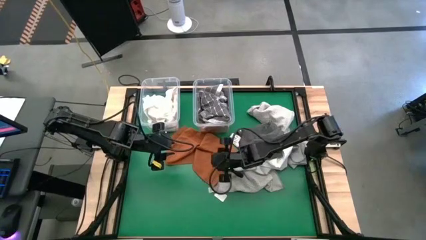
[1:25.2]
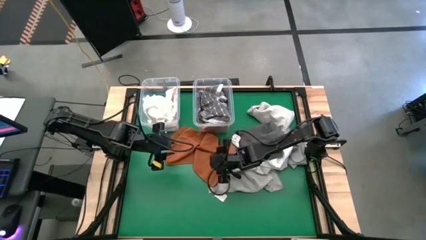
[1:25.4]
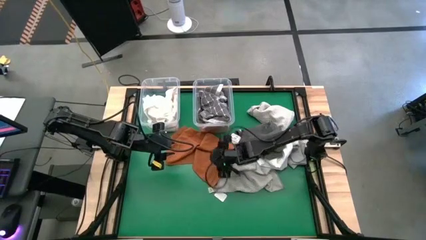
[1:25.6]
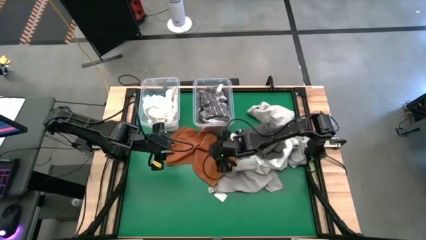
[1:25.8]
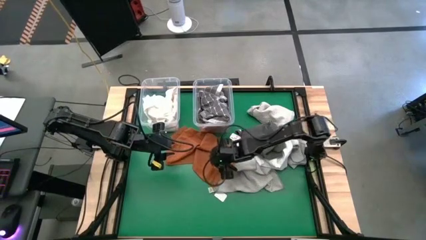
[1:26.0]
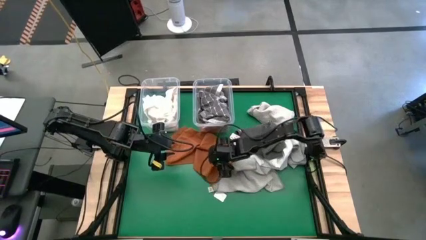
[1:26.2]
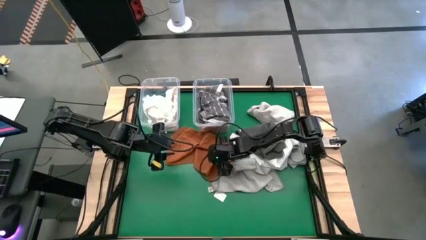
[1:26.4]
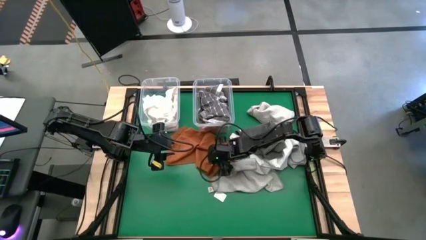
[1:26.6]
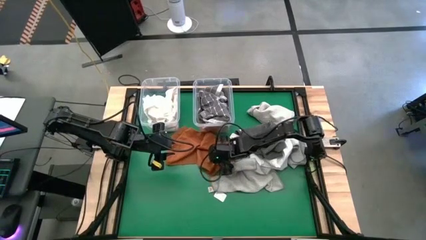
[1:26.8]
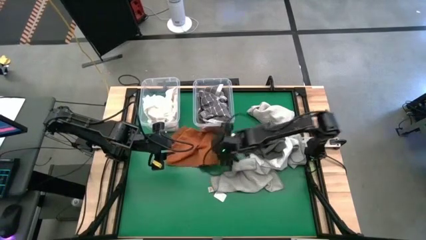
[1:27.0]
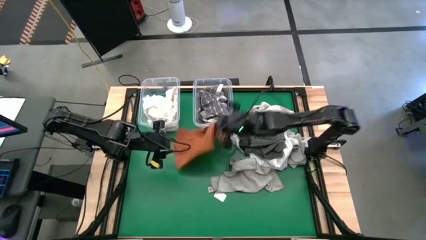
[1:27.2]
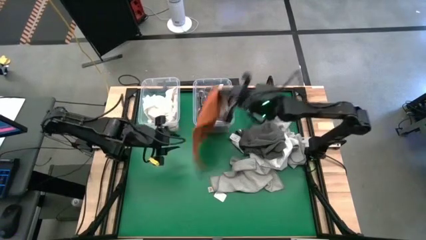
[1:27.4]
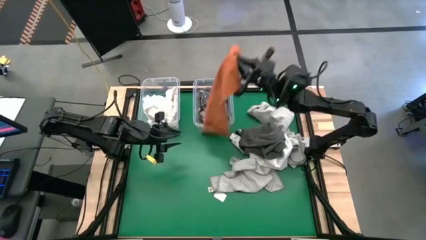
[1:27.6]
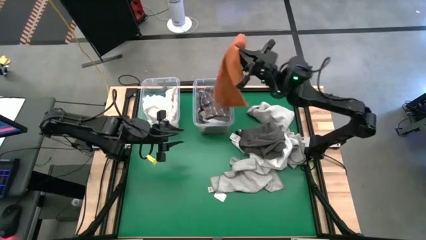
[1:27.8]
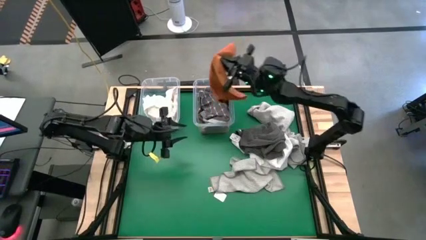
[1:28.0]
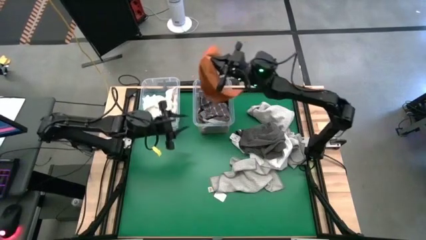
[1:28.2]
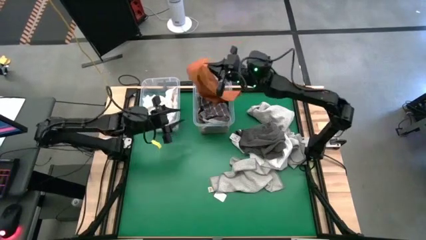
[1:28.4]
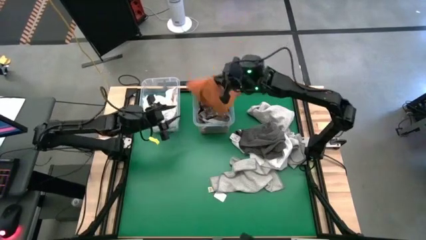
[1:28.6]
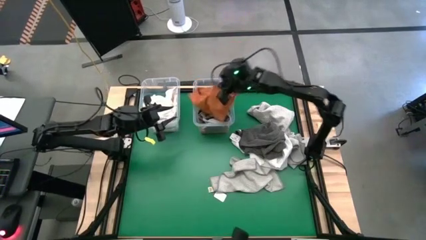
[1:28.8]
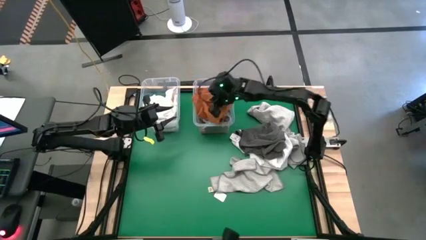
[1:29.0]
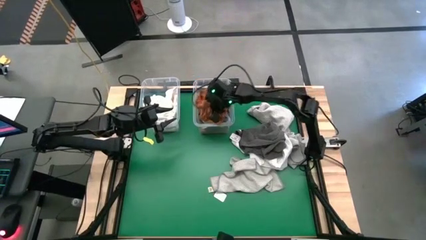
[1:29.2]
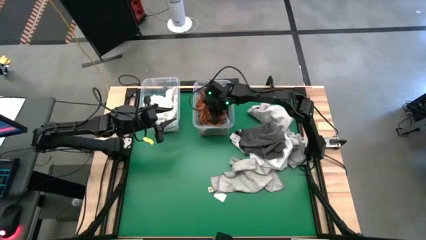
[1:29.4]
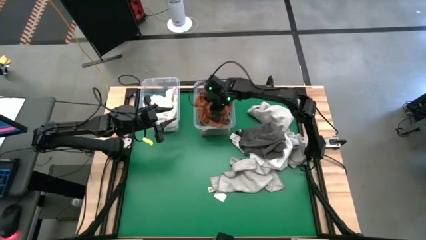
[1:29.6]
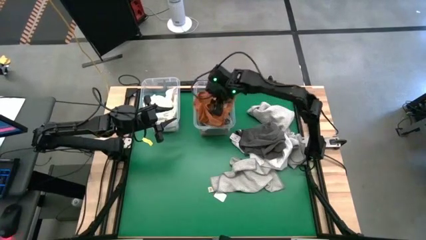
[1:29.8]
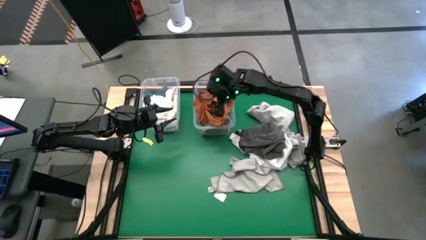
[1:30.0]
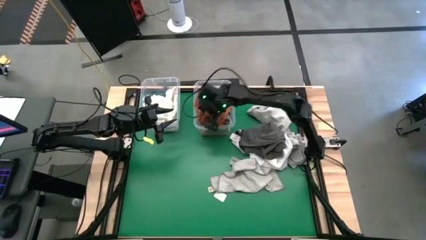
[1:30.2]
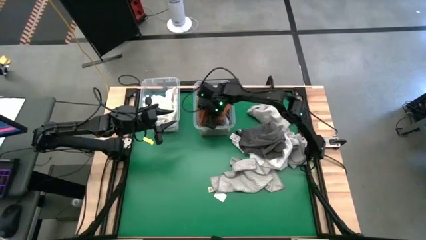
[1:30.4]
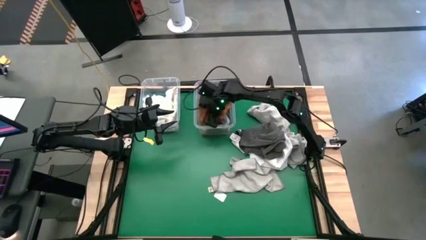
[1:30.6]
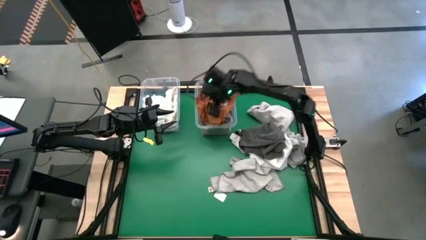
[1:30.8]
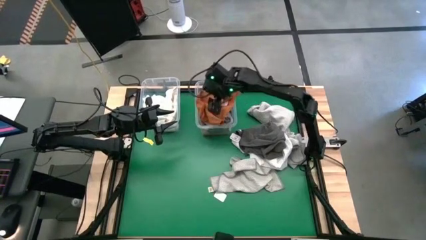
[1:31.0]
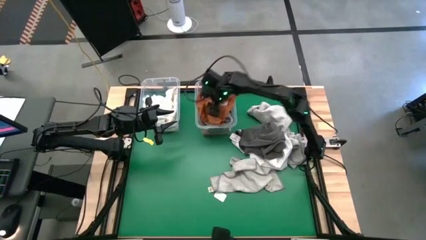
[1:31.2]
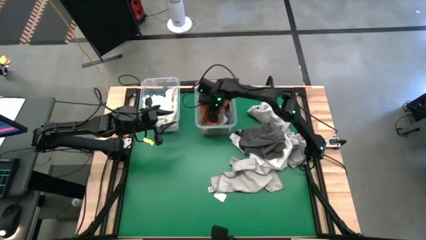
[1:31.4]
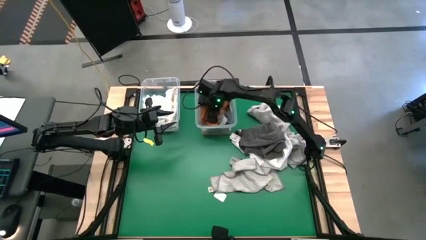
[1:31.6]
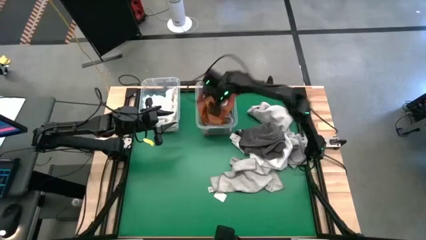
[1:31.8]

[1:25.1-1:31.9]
Task: Sort towels by color in basket
Put the orange towel into the right transparent bin

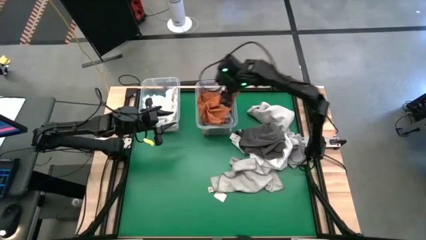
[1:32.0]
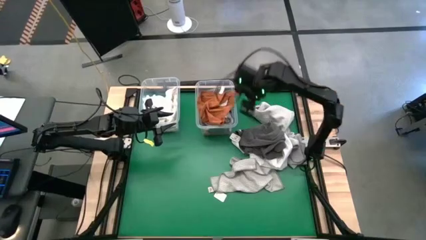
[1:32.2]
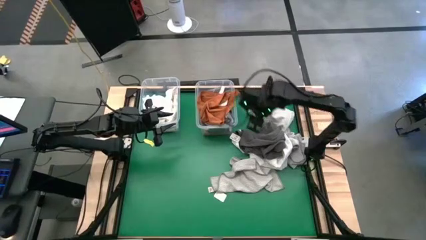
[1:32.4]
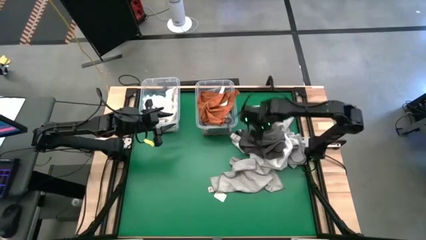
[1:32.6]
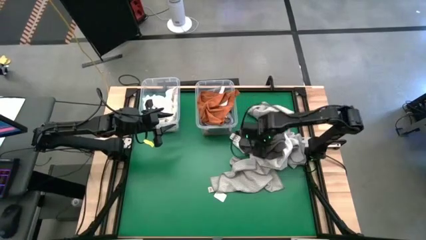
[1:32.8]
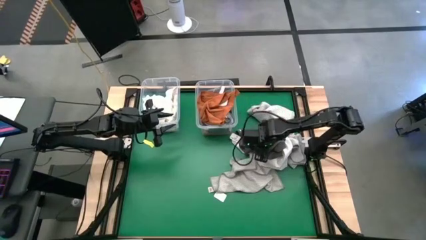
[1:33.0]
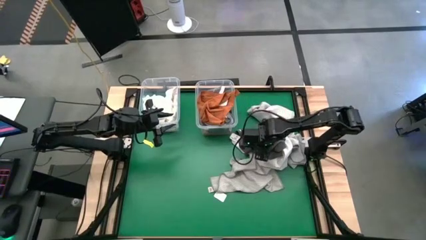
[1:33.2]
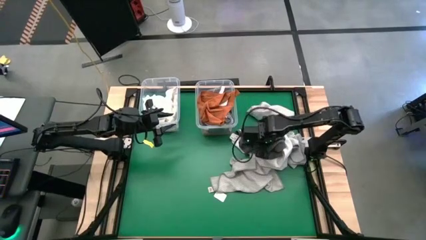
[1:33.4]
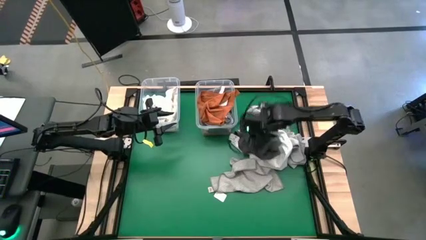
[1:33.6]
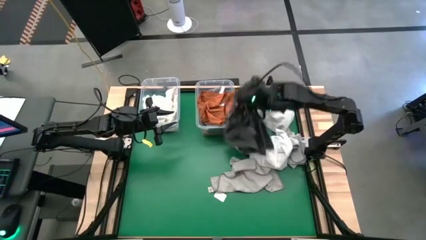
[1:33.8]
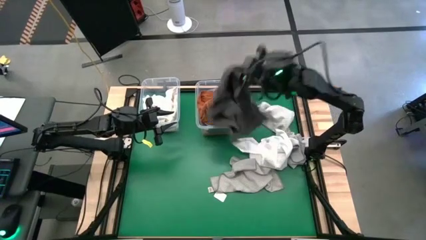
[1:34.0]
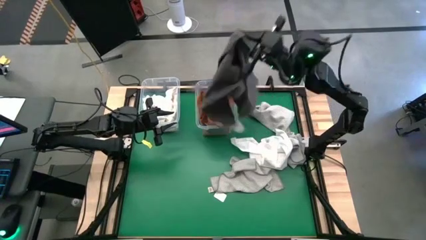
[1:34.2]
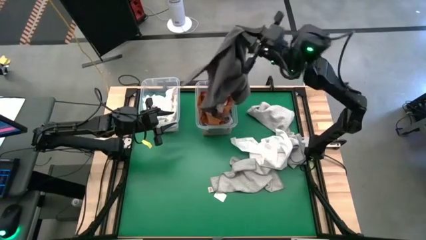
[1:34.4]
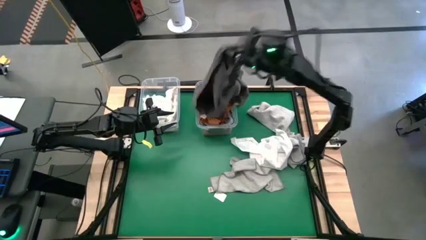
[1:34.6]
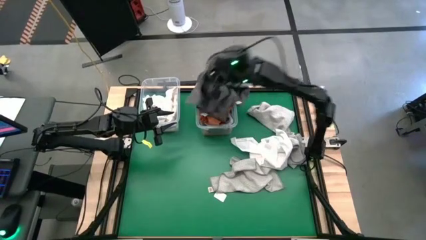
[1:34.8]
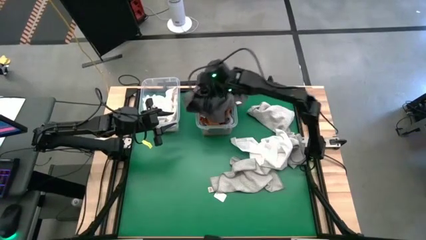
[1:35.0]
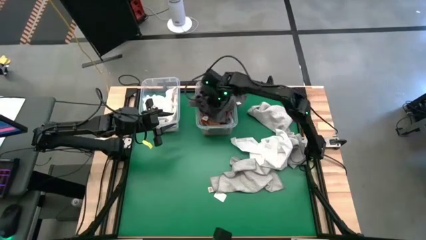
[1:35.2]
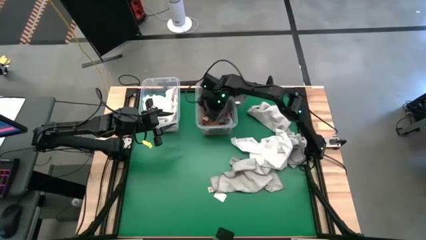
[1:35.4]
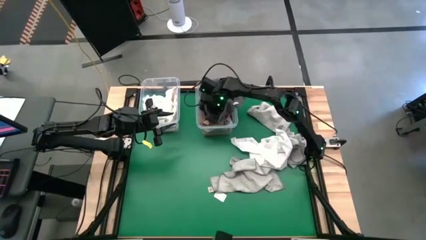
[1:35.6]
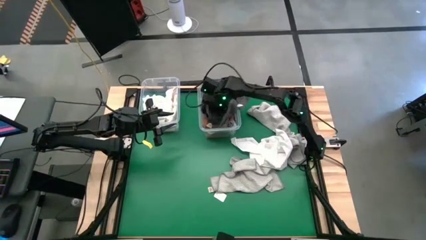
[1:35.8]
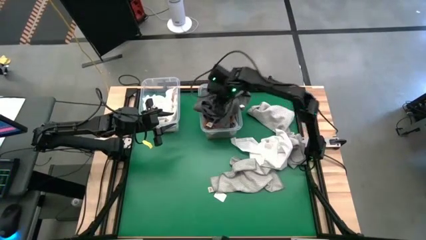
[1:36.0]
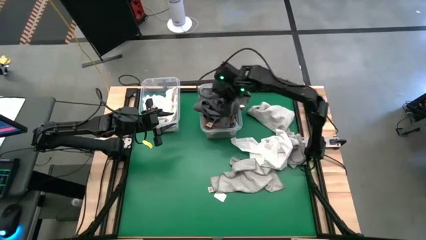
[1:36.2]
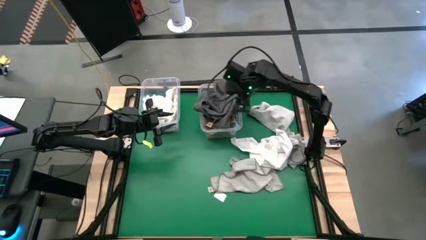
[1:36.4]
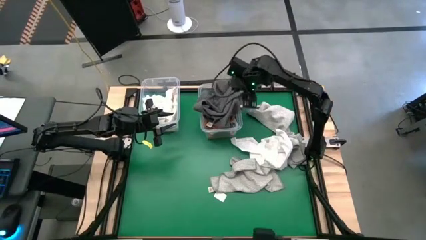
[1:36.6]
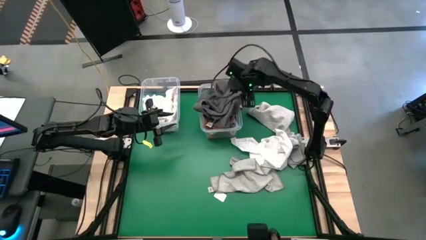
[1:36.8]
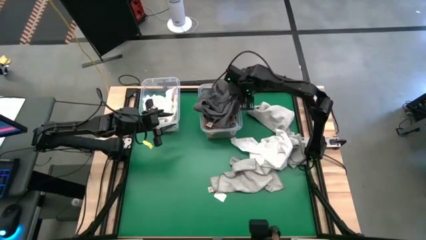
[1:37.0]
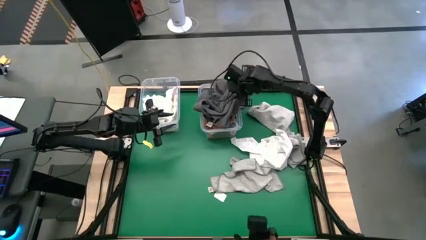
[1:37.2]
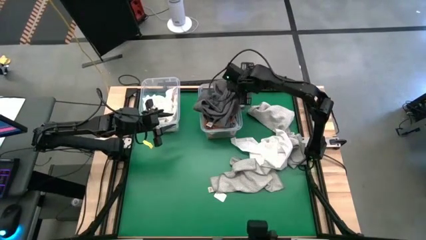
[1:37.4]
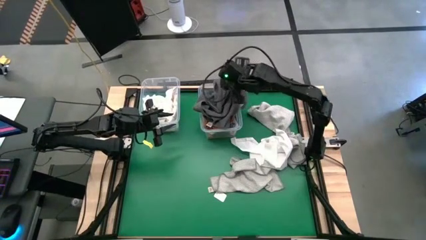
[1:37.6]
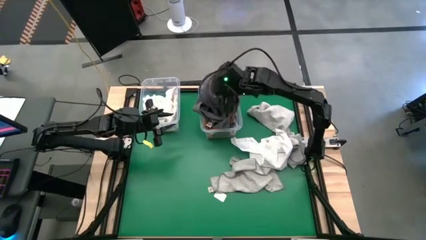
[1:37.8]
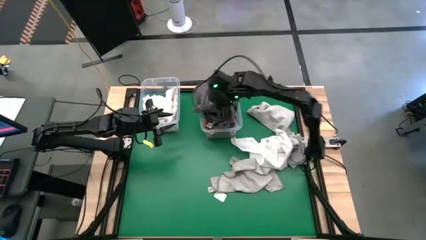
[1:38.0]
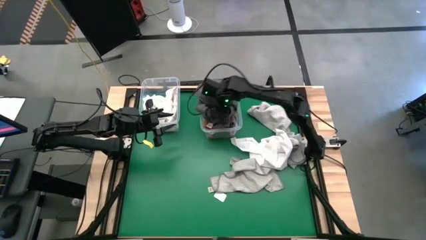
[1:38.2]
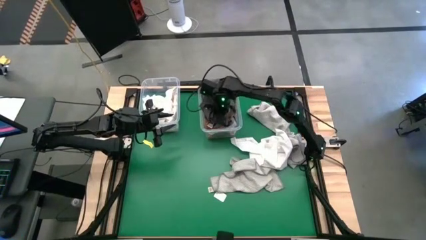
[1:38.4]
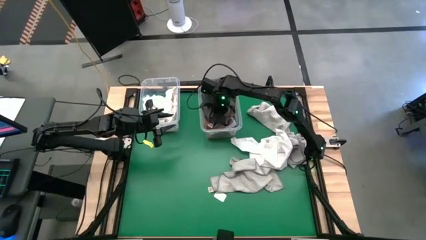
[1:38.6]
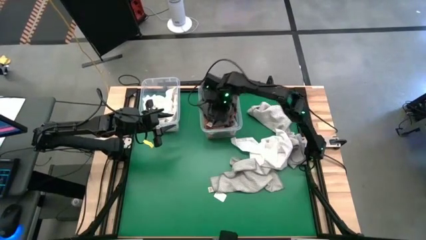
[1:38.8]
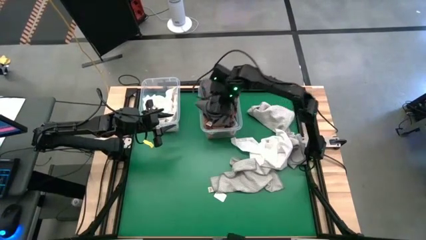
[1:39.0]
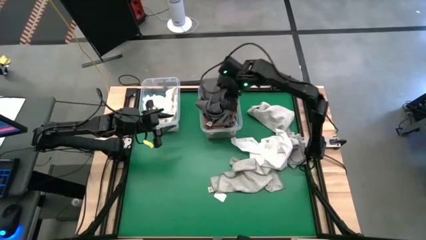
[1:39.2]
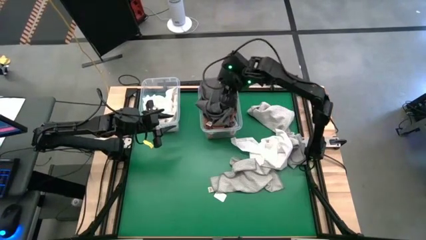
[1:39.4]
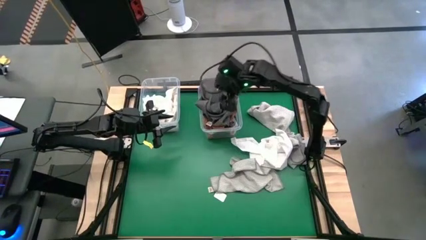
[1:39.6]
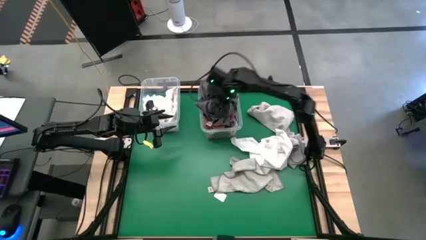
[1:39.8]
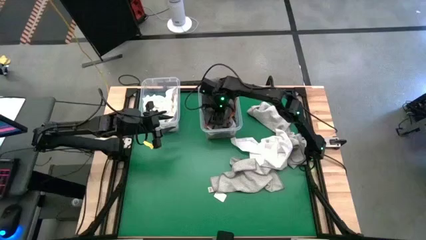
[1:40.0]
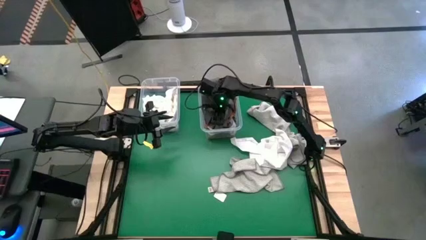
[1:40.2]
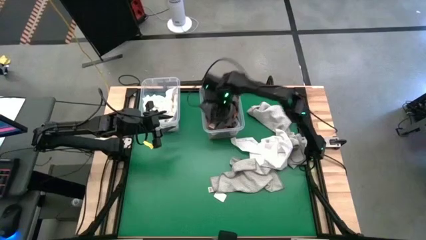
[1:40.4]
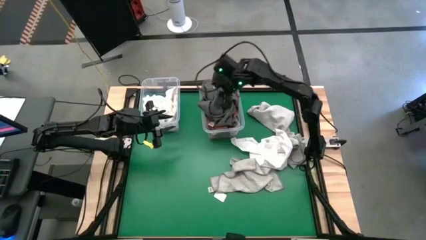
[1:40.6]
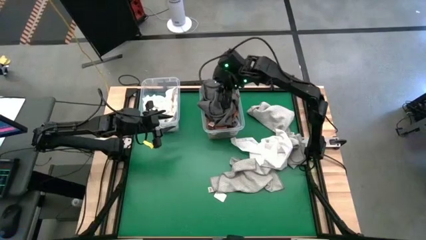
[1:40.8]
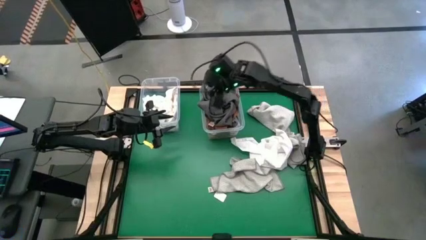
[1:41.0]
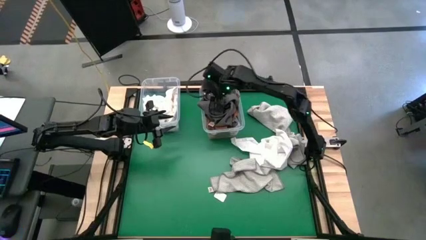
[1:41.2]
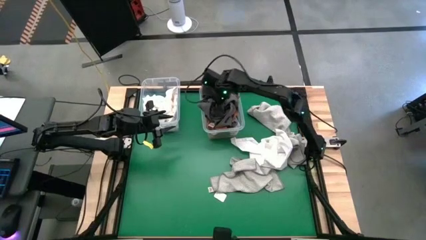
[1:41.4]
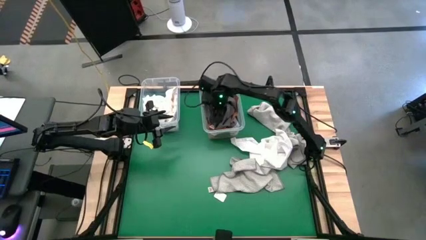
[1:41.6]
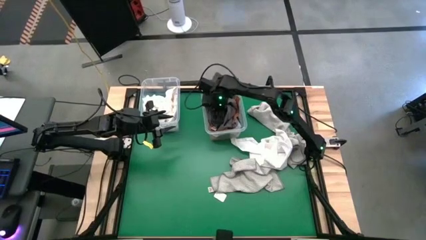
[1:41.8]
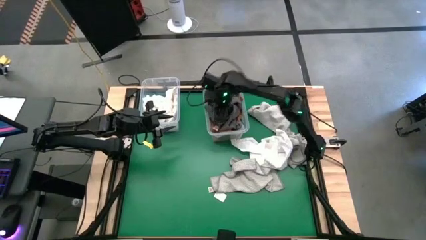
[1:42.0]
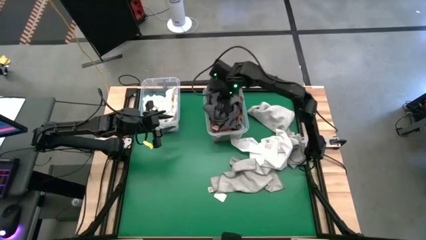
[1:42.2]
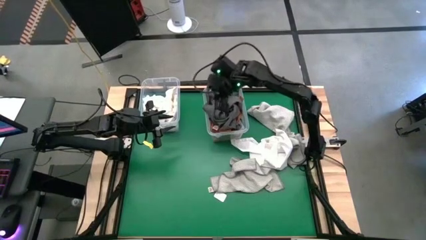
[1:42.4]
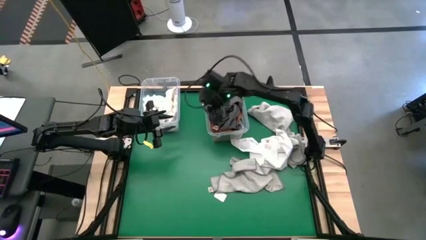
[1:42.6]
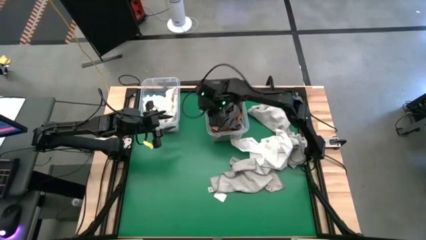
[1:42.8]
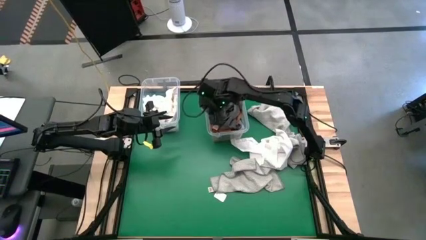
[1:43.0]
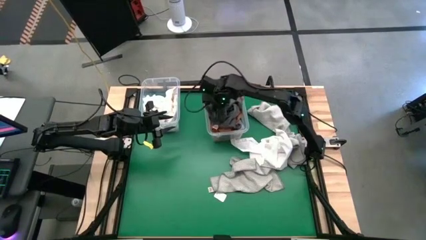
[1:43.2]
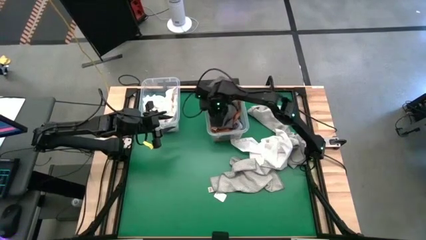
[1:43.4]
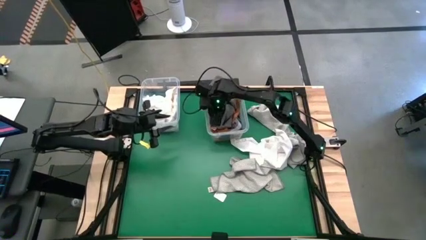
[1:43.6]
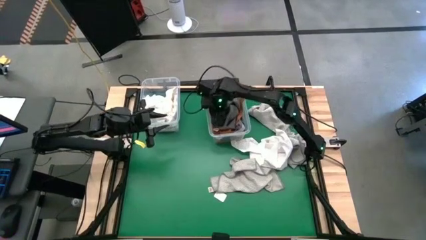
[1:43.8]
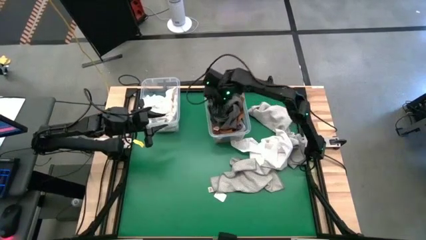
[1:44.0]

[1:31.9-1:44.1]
Put the dark gray towel into the right transparent bin
